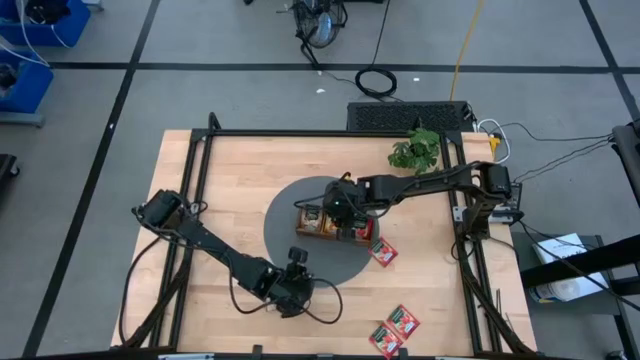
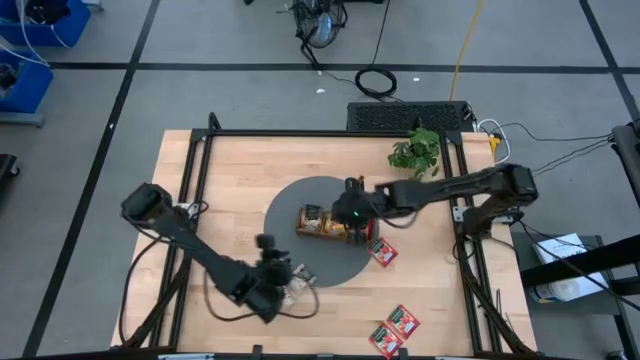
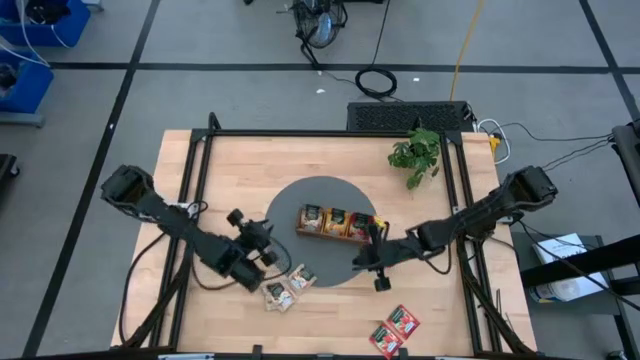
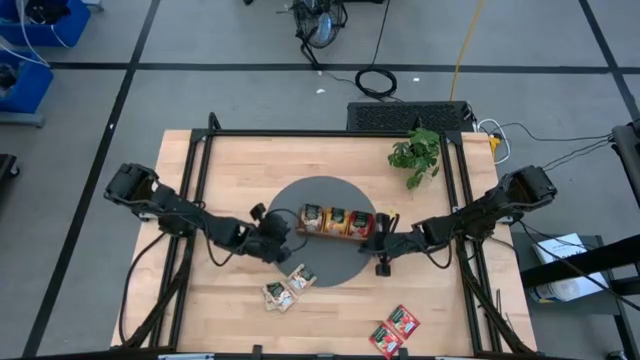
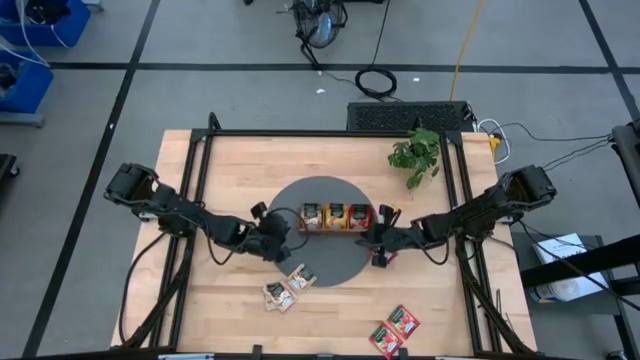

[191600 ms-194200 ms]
Task: Pick & Place Tea
Adjust the wooden organizer

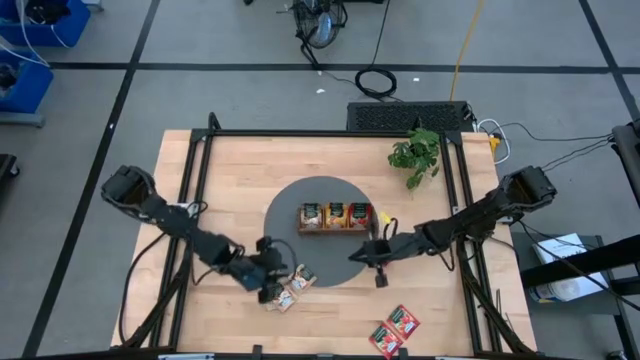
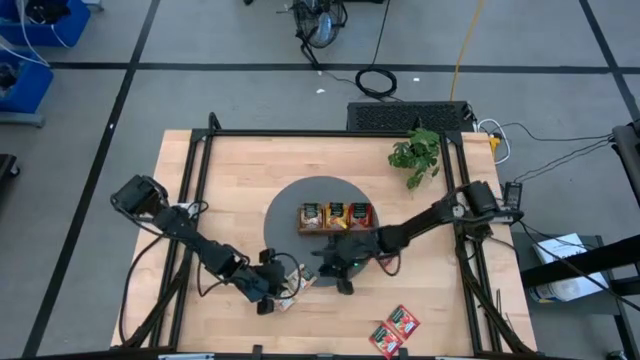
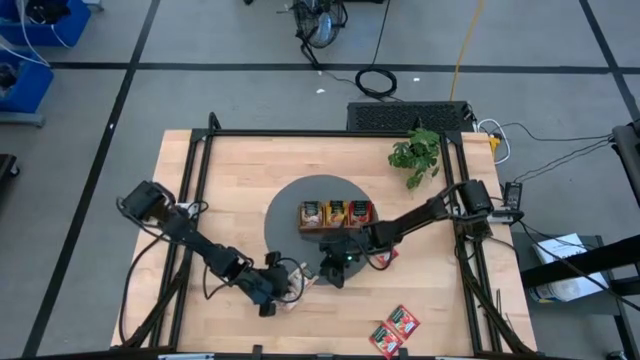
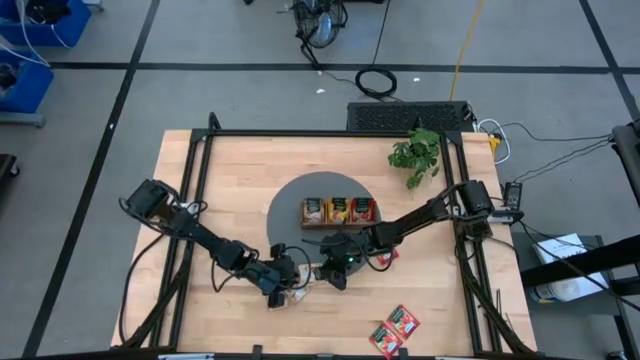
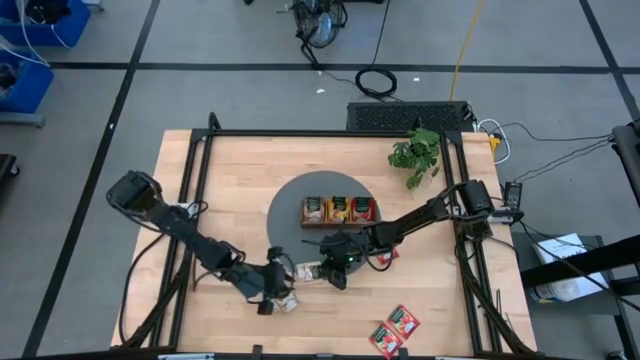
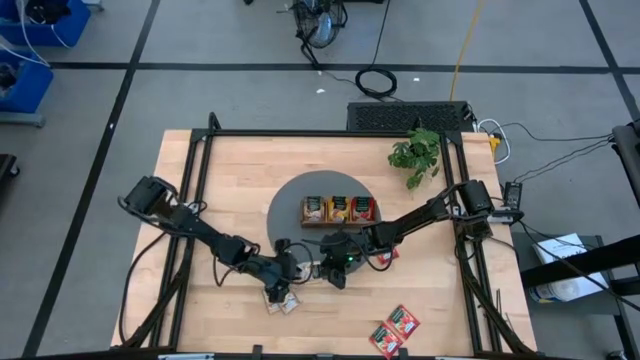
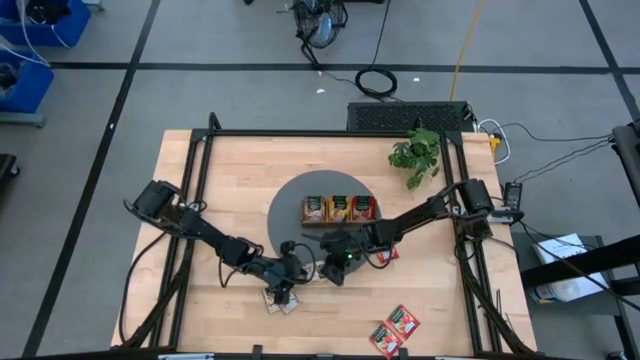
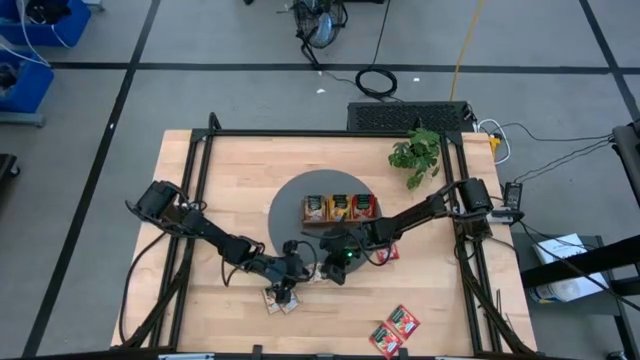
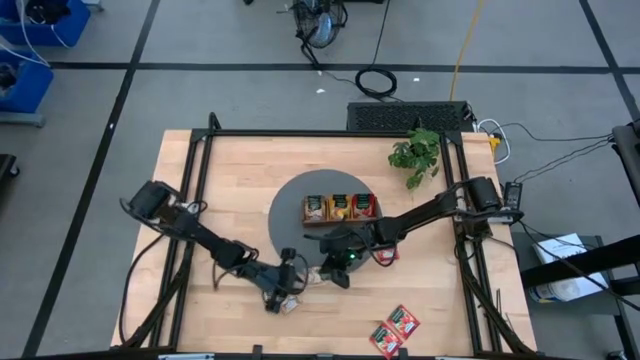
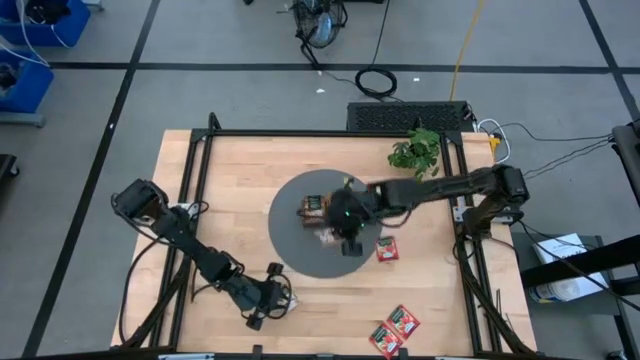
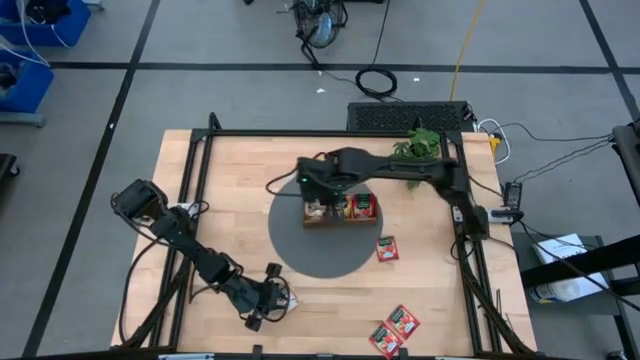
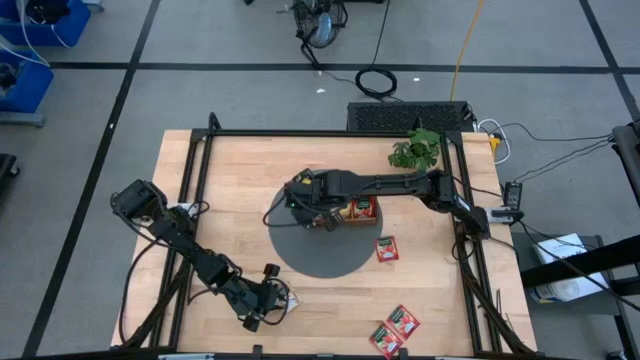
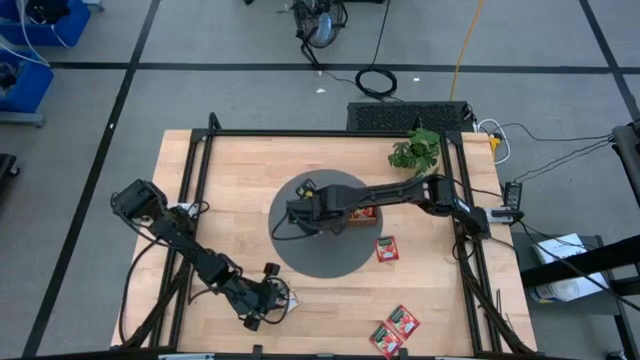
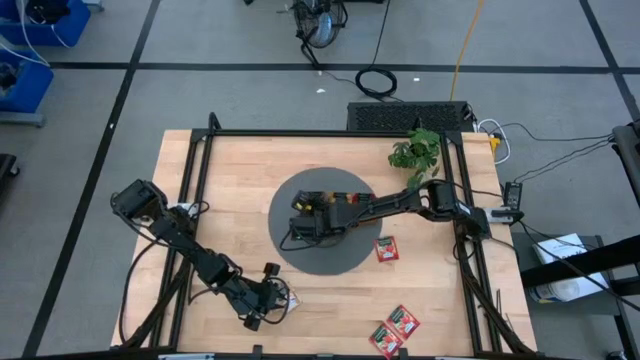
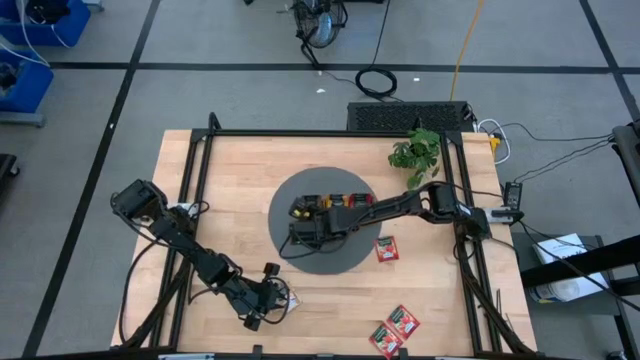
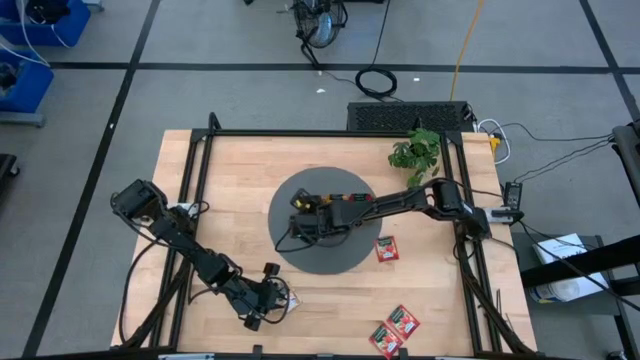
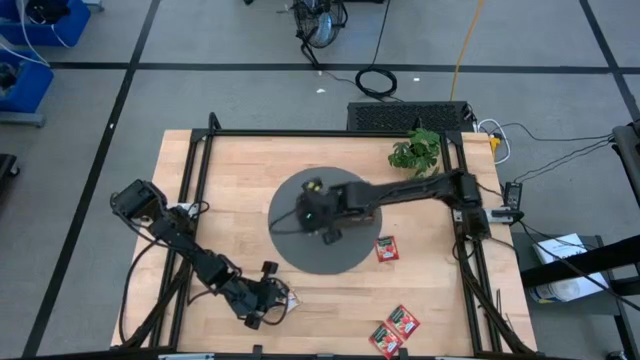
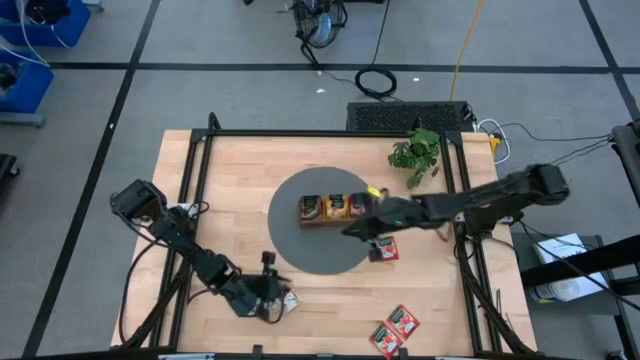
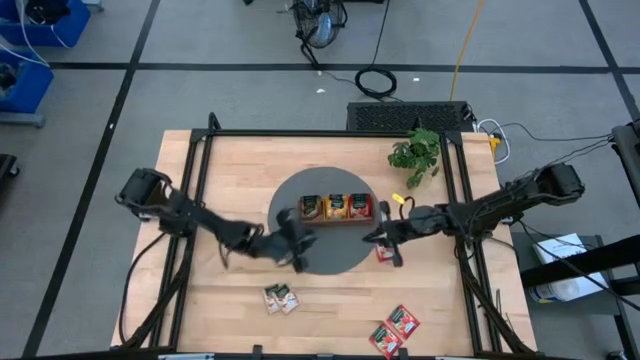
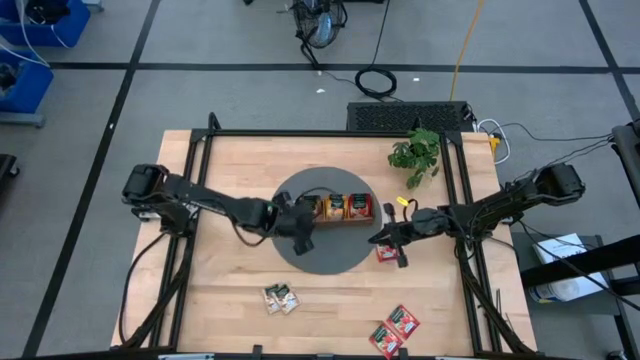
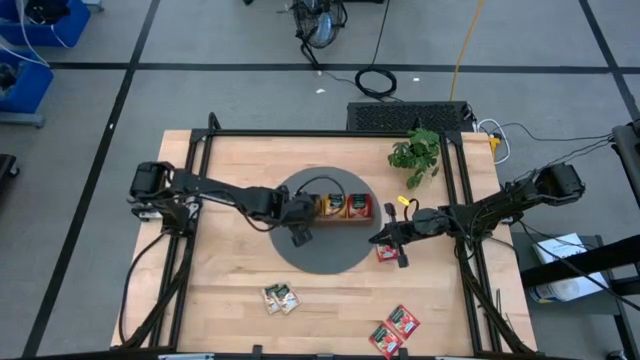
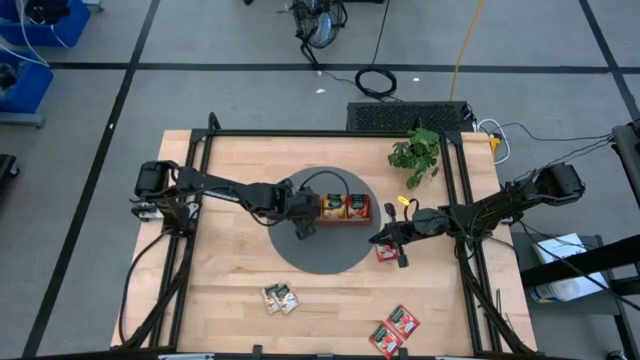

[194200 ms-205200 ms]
Put the right light brown tea sachet into the left section of the wooden organizer

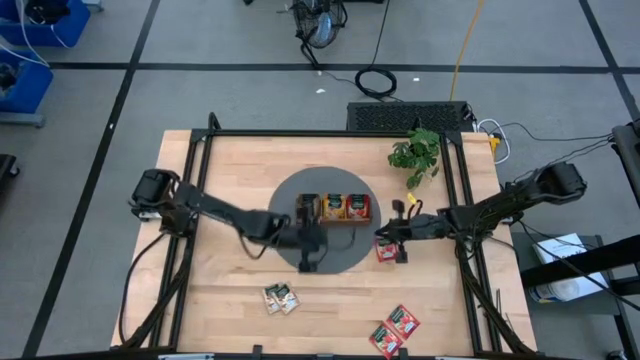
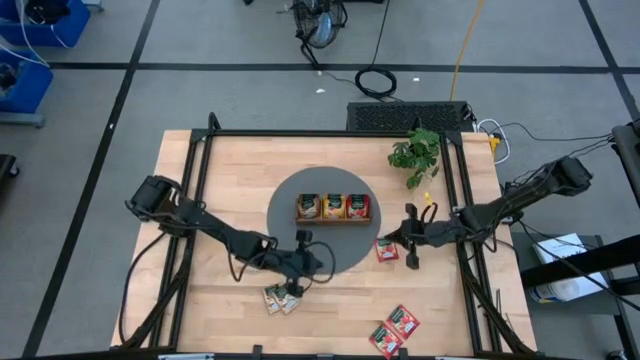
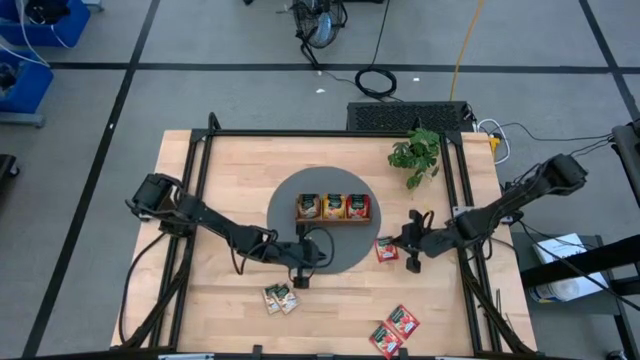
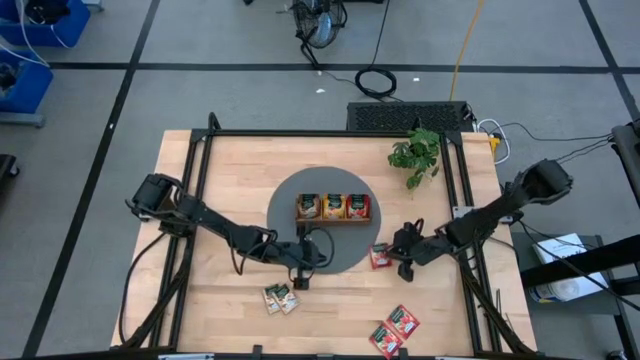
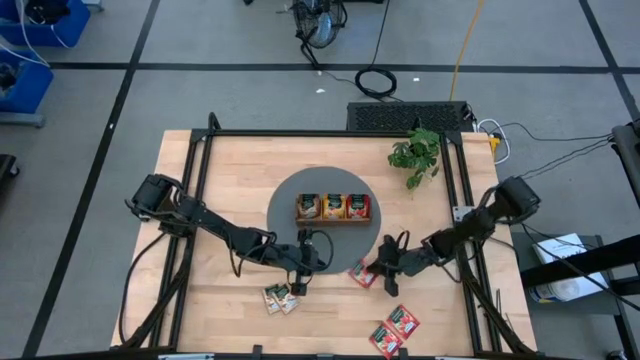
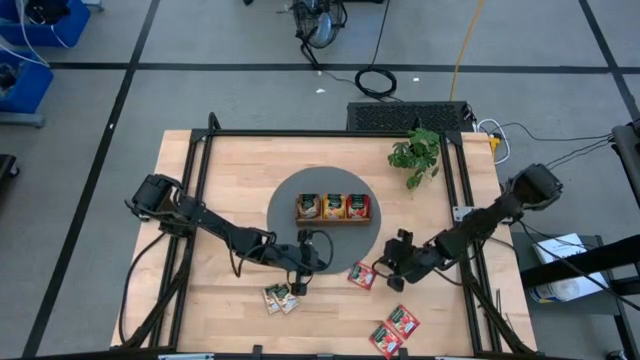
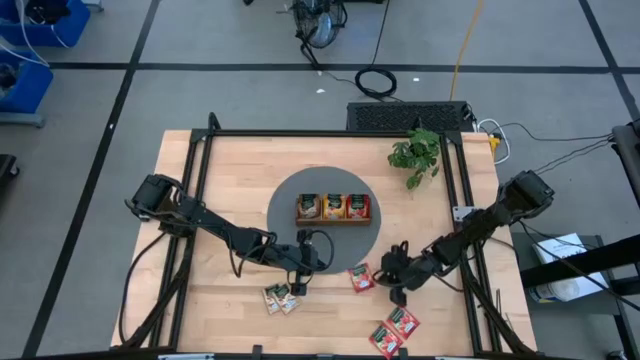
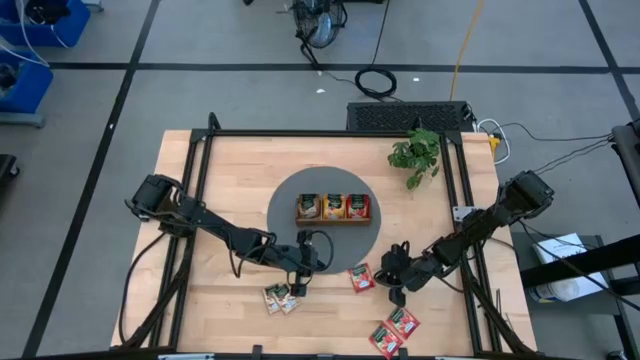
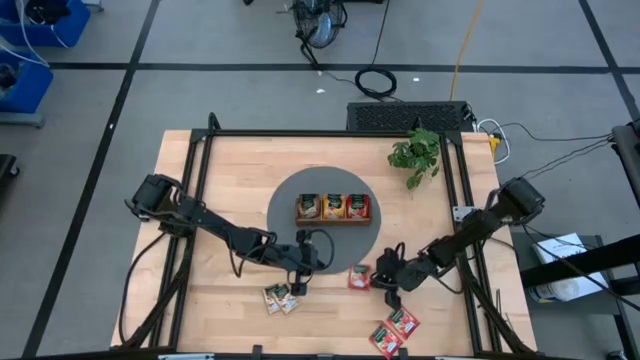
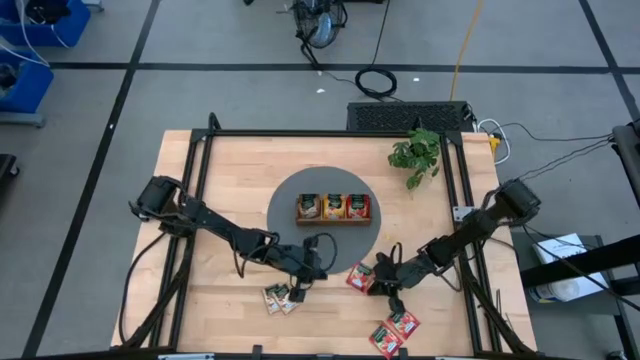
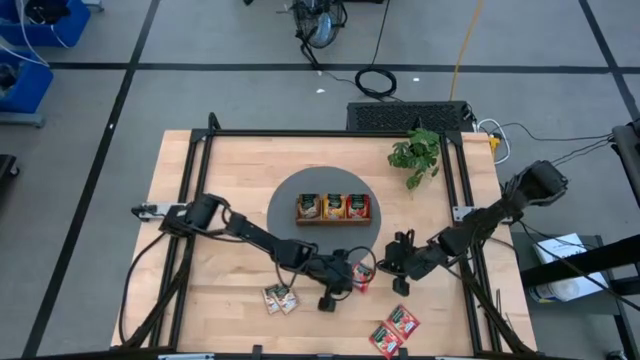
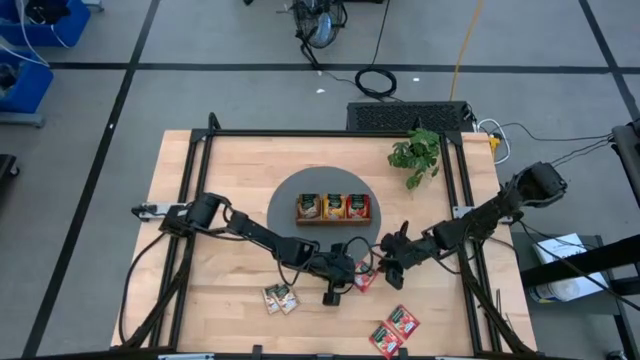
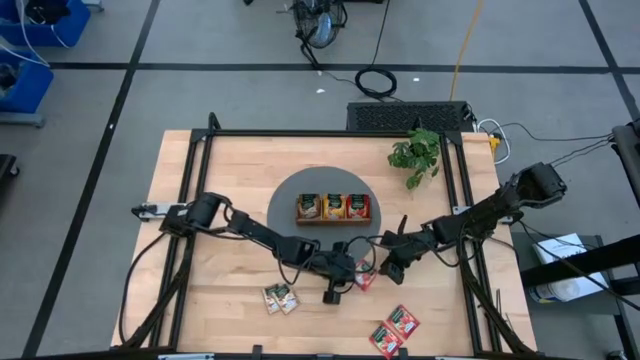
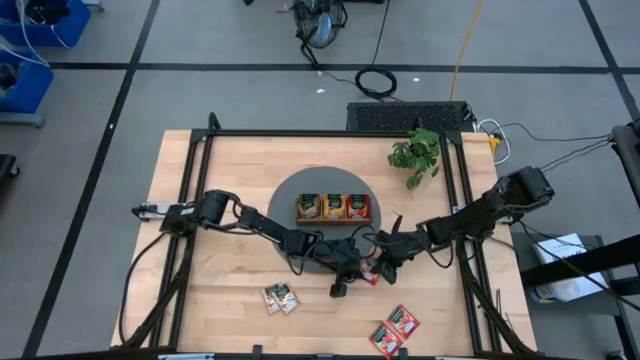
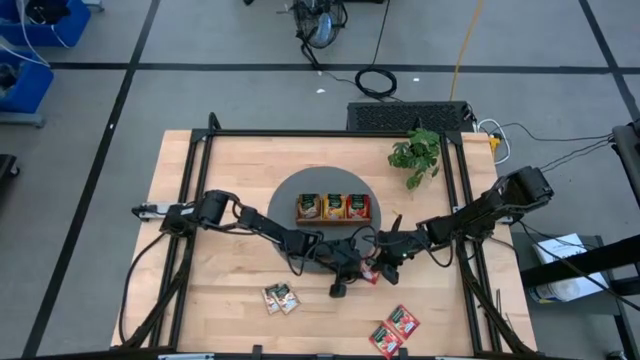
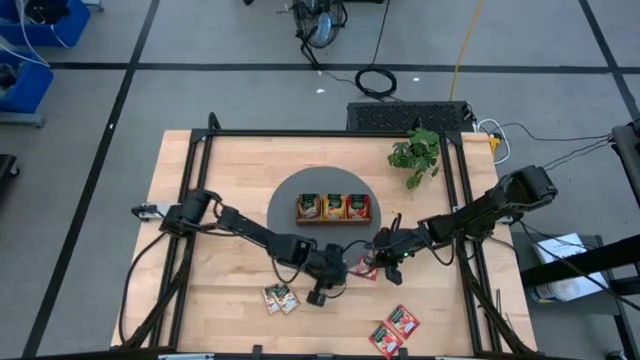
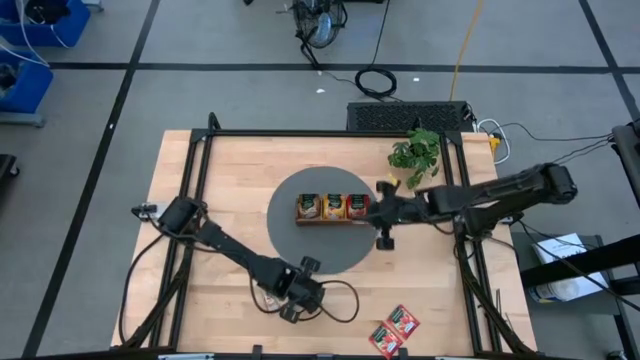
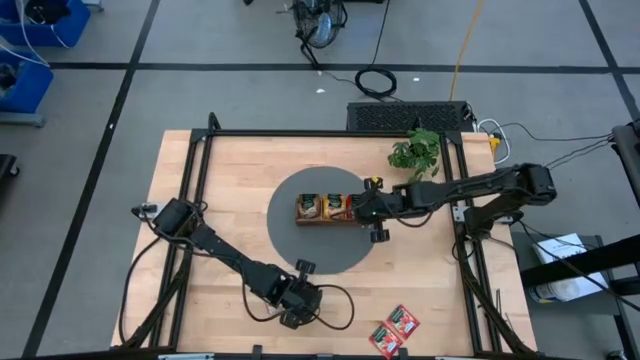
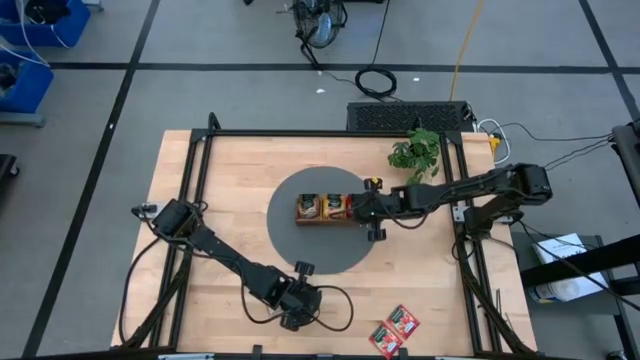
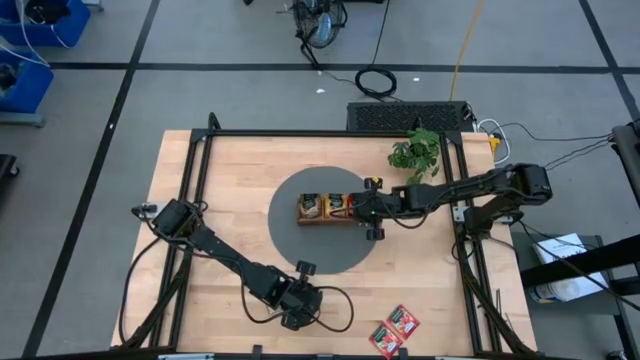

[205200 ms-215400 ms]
Put the top red tea sachet into the right section of the wooden organizer
